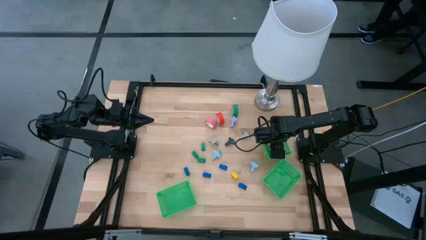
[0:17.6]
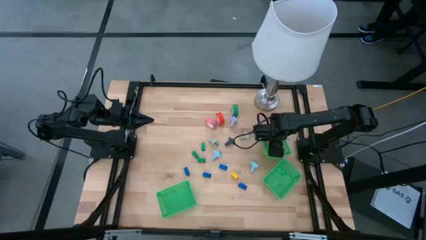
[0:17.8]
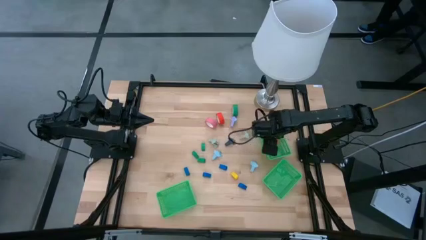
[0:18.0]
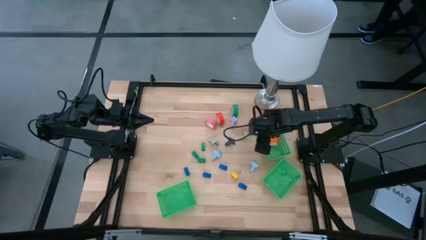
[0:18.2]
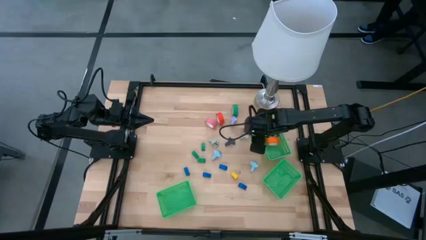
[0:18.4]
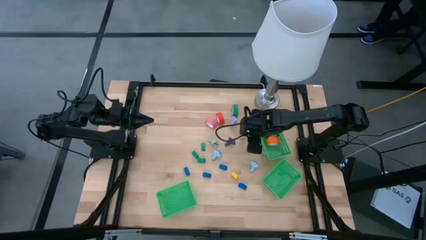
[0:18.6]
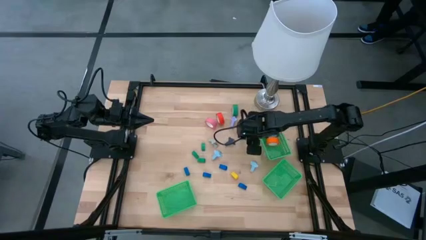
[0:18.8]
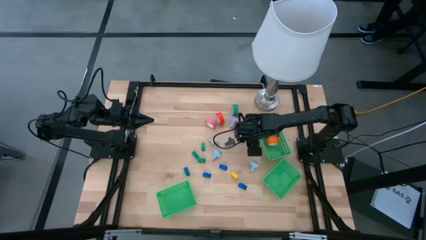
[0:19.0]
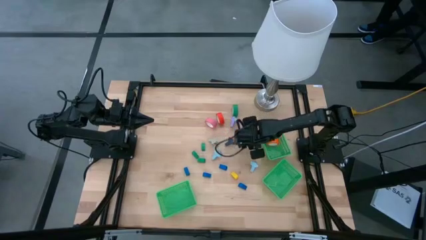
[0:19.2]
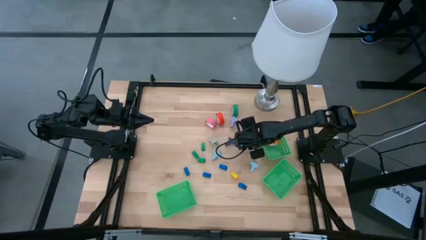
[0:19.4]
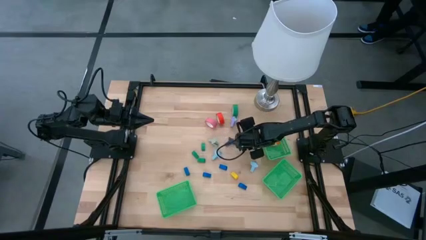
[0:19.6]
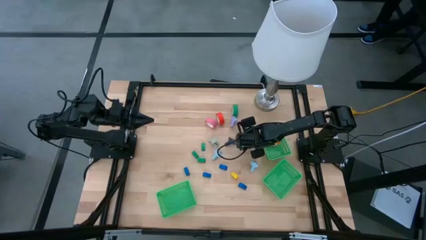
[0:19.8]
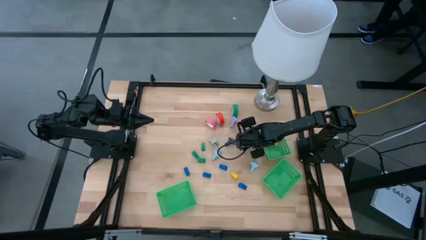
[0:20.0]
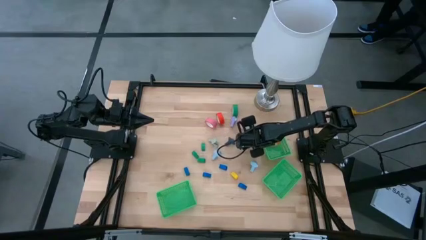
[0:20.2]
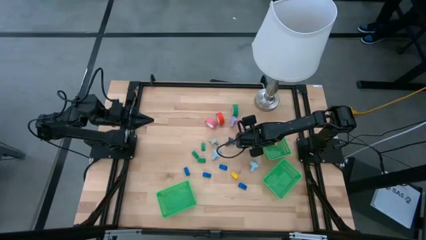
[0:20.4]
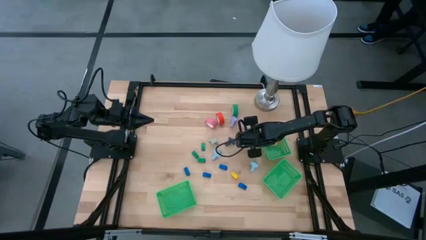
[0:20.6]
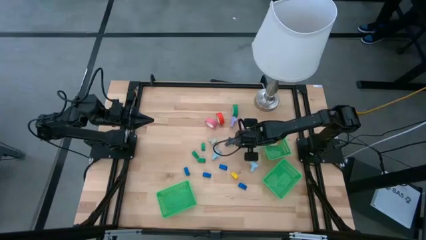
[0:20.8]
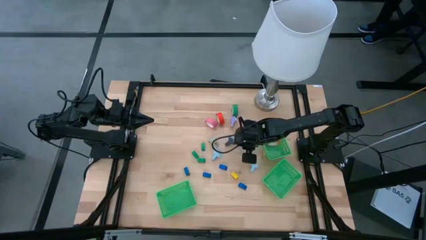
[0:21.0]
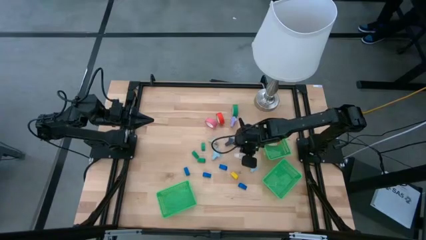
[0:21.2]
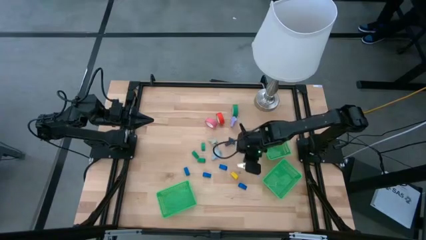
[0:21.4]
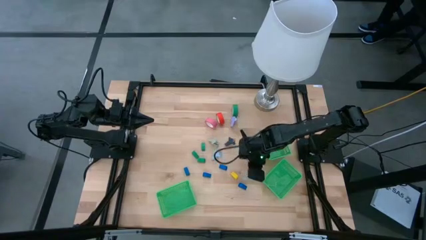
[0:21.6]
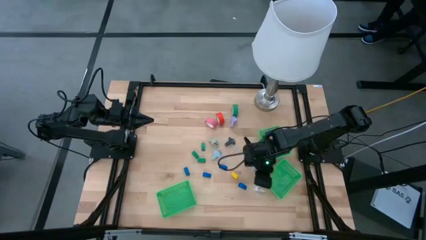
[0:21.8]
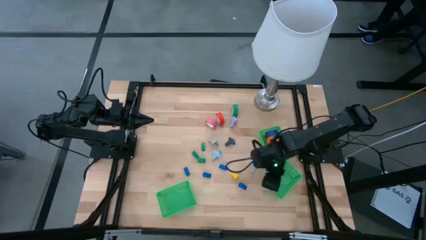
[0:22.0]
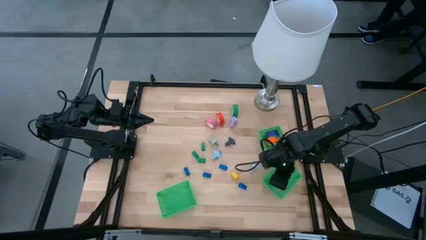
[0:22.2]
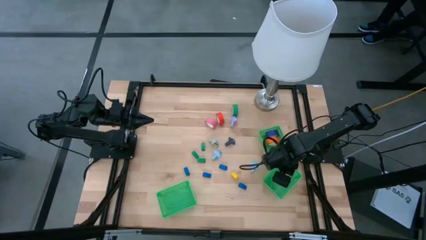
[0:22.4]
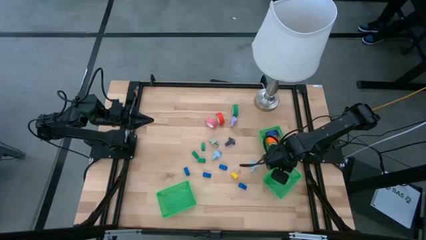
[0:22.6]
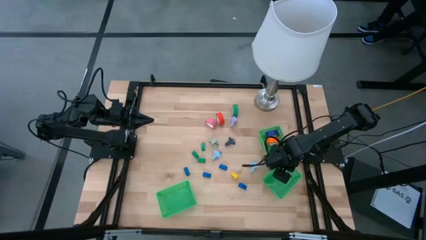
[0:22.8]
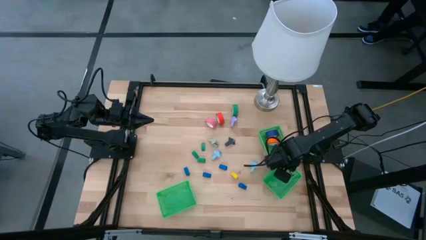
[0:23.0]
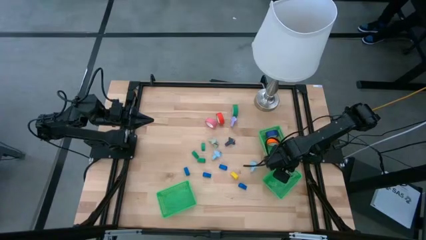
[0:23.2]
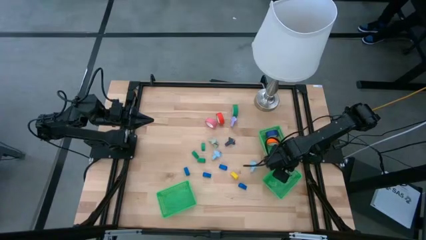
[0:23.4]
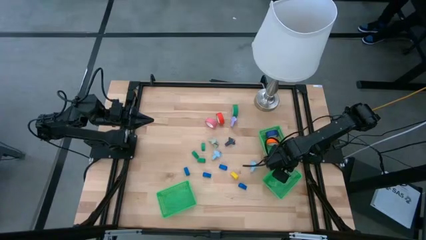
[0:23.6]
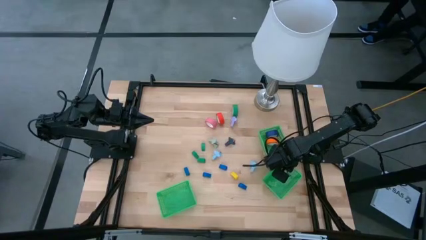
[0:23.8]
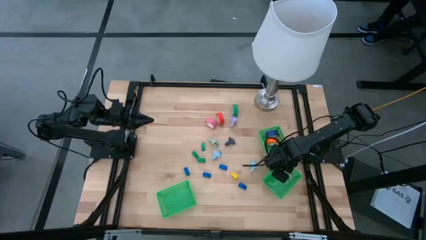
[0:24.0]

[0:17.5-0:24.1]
Task: Pick and place Stapler, Stapler remover, tape
Put the right gray staple remover into the bottom right green bin

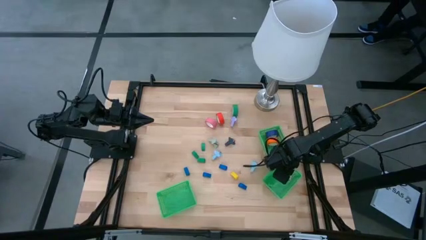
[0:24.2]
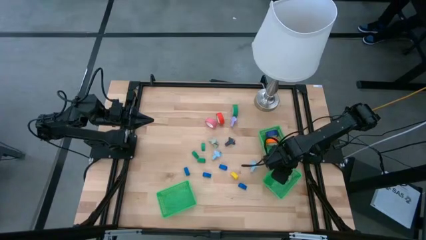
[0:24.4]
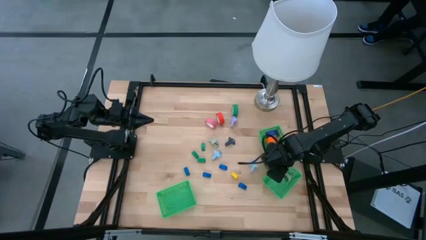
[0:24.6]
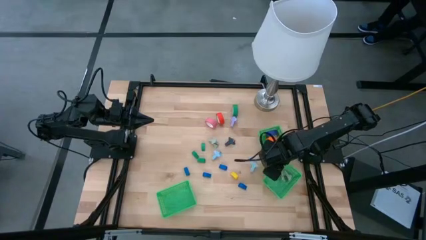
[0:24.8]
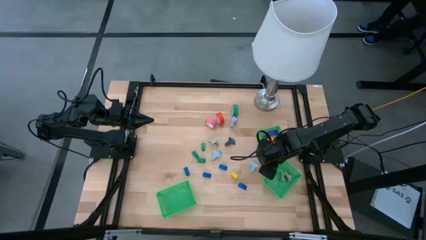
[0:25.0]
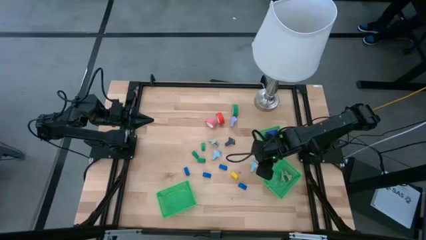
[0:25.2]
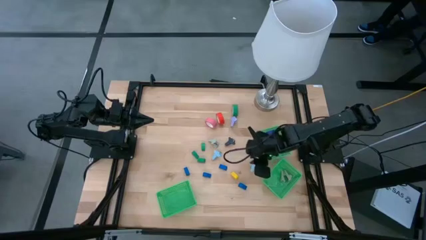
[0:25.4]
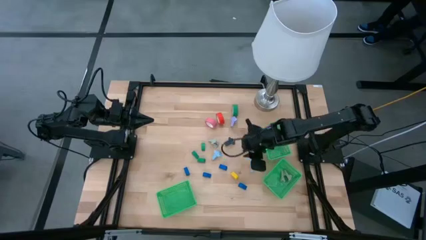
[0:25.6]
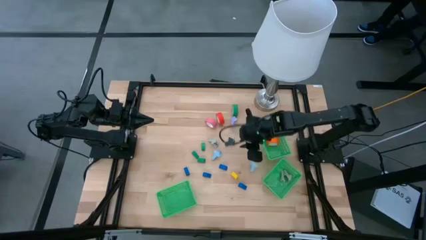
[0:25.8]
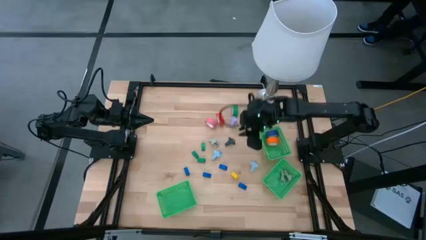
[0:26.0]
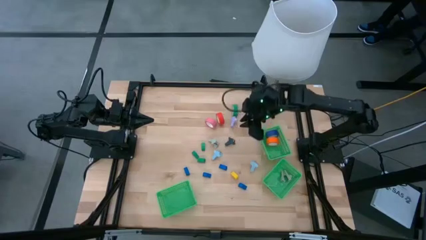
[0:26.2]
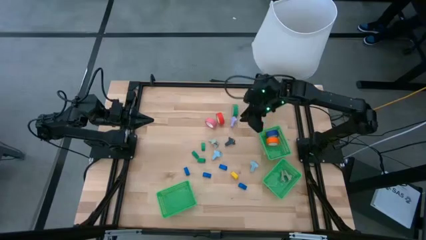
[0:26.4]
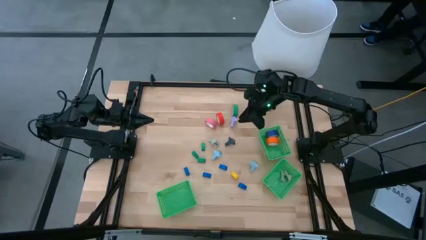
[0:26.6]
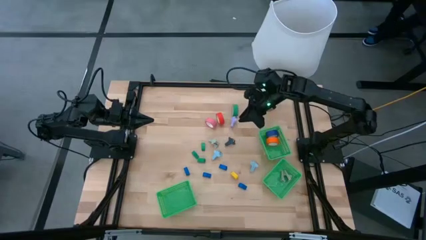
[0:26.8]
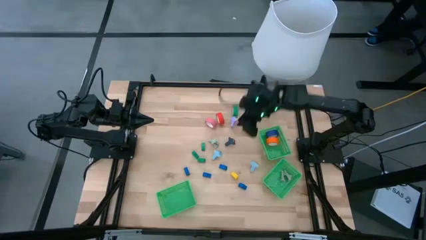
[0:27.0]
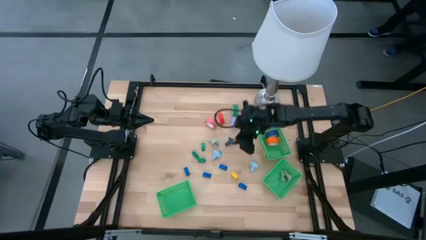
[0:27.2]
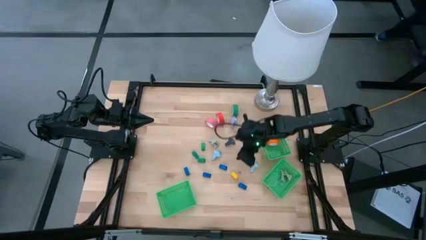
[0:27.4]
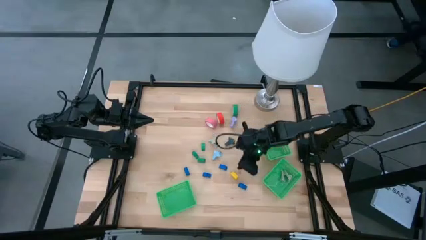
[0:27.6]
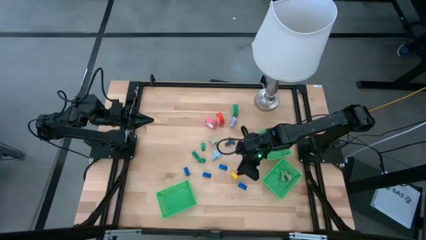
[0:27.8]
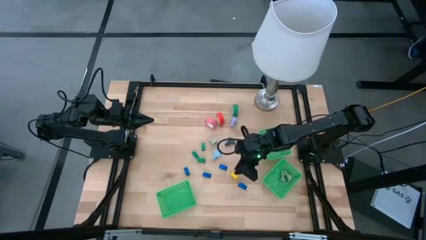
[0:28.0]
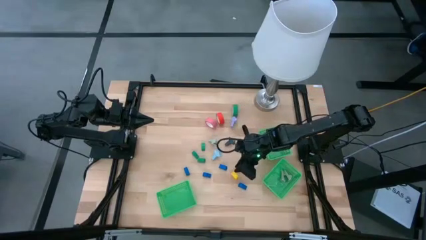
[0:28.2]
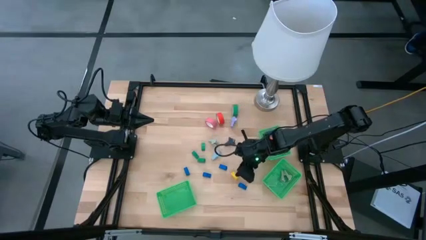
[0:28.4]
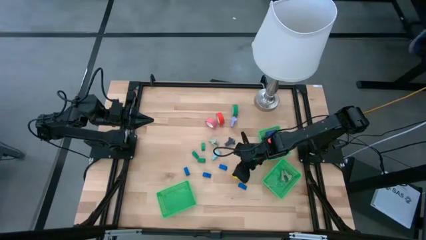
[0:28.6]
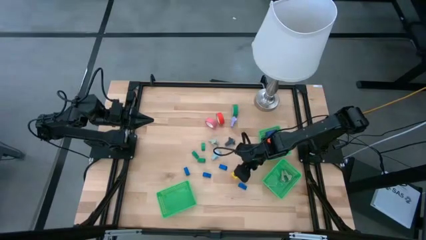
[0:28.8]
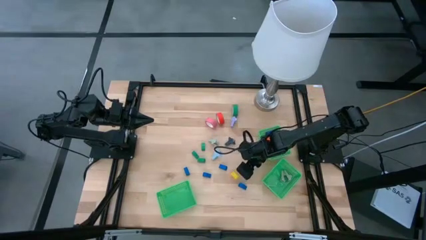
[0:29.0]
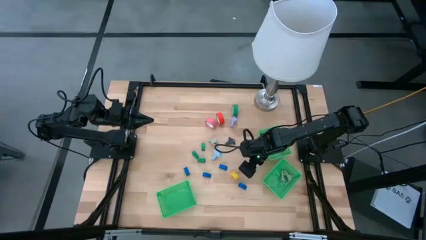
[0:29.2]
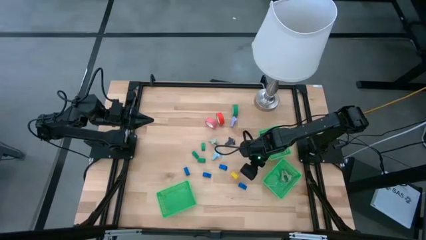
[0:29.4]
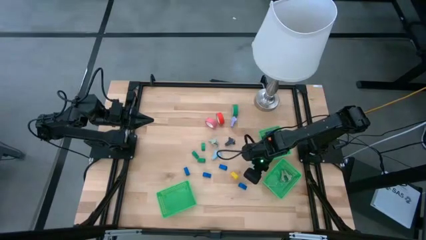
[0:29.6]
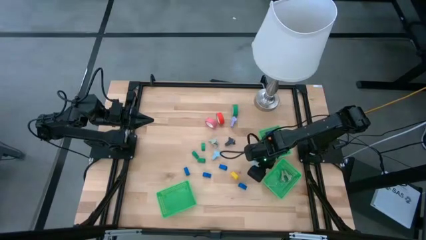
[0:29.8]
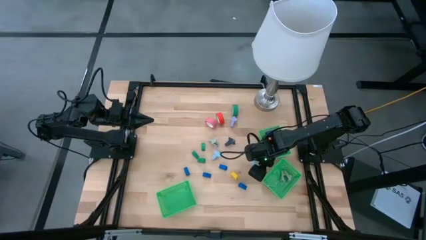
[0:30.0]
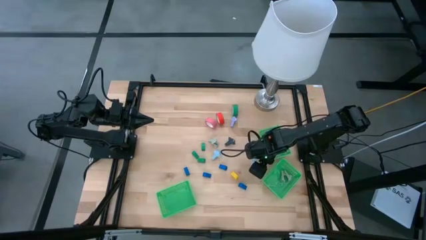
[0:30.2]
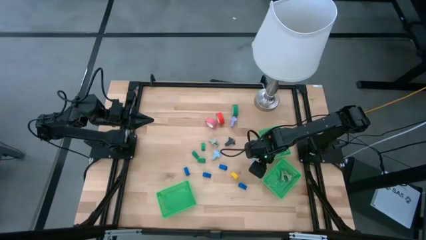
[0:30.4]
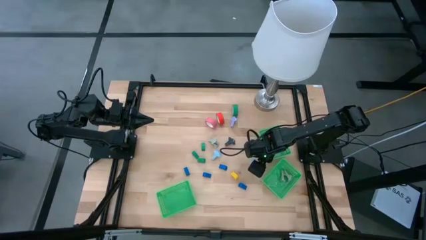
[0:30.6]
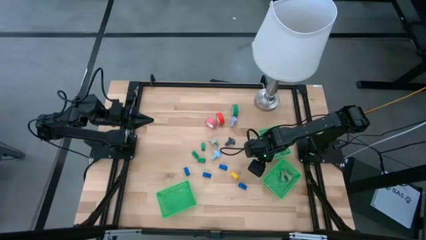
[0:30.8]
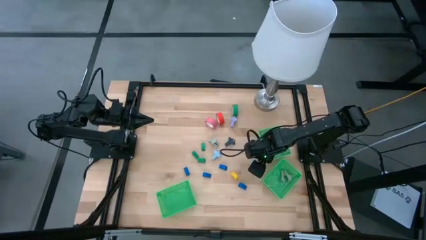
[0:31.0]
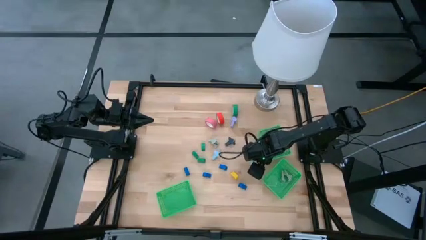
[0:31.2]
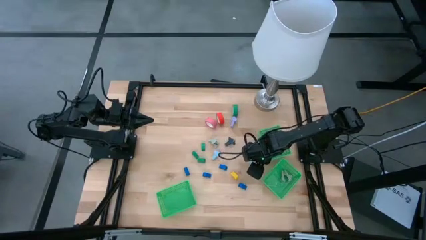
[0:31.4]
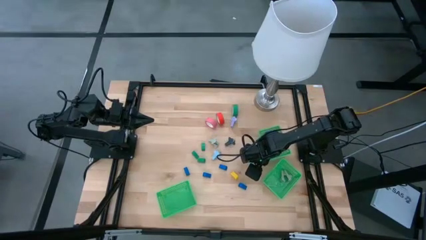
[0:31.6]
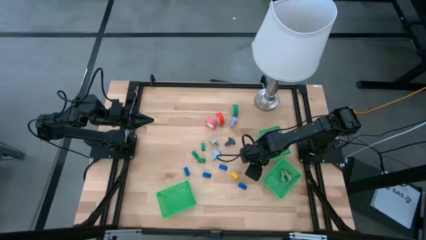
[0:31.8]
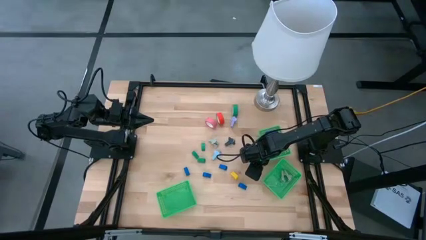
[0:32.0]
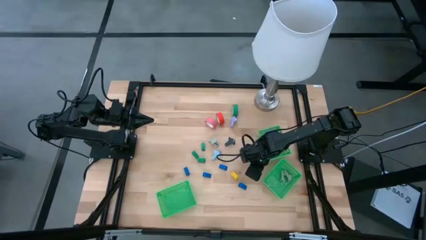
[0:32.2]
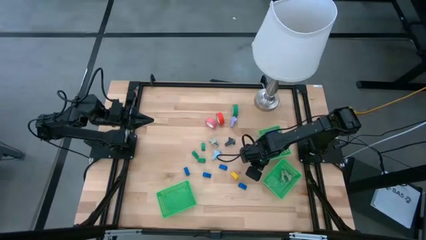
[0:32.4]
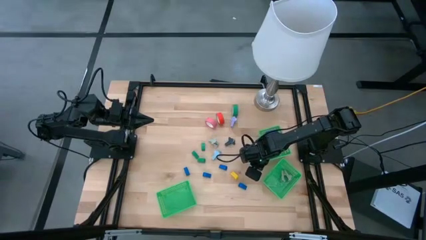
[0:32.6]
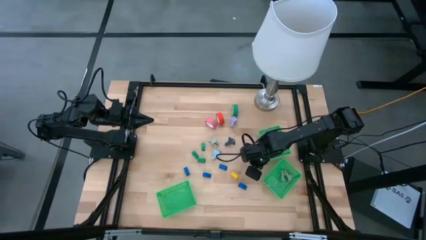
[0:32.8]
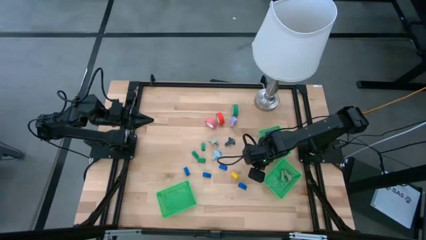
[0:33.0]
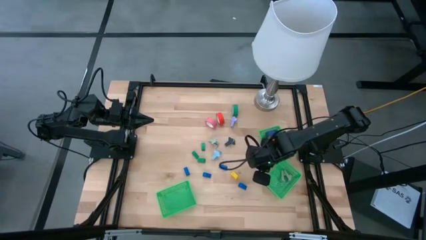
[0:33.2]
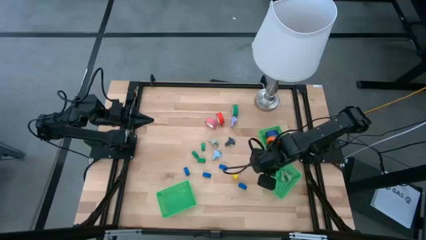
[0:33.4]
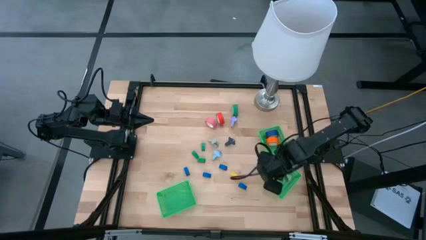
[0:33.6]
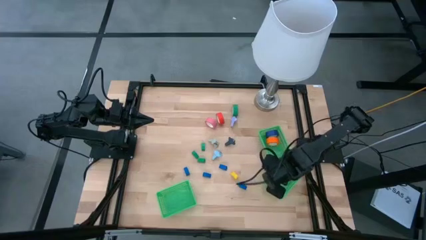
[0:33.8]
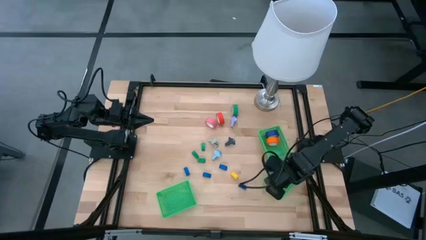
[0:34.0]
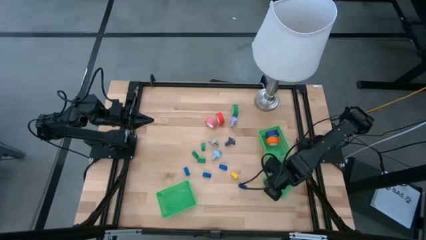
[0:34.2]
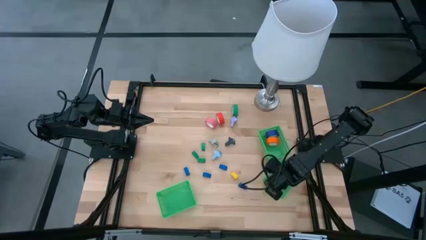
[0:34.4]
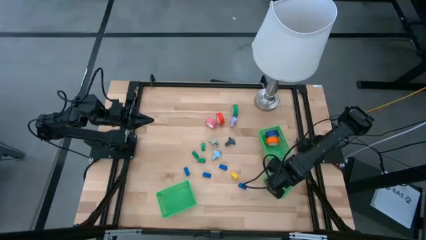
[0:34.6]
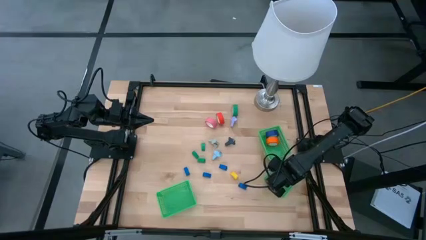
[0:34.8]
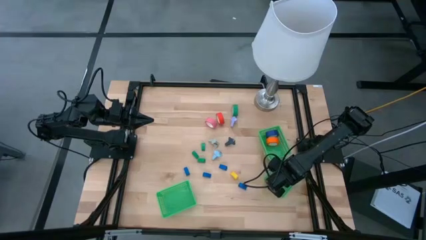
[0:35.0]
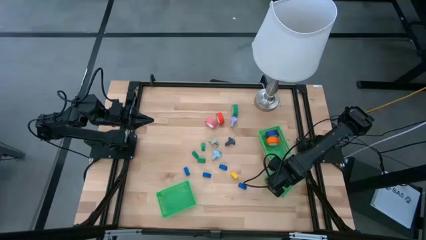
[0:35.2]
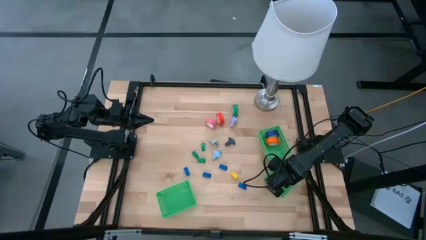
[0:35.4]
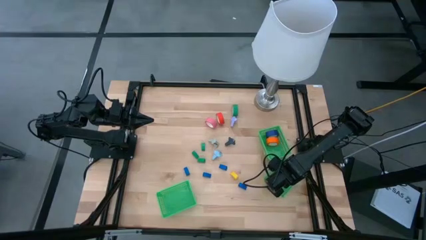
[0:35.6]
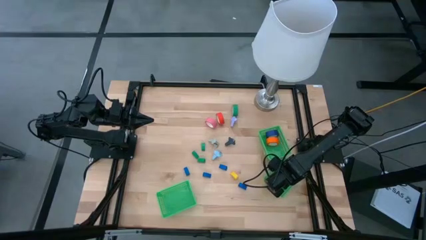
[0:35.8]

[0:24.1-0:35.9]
Put the bottom light blue staple remover into the bottom right green bin
